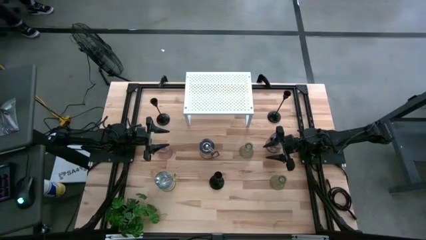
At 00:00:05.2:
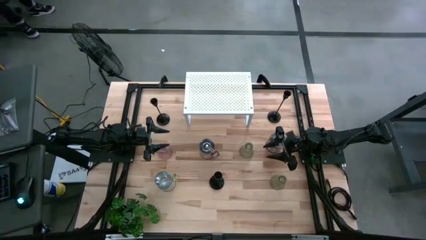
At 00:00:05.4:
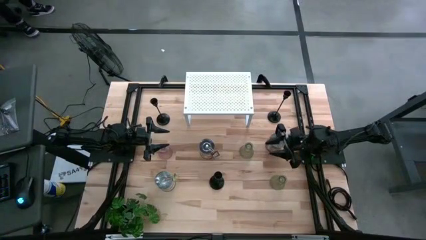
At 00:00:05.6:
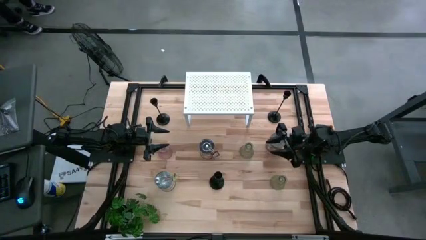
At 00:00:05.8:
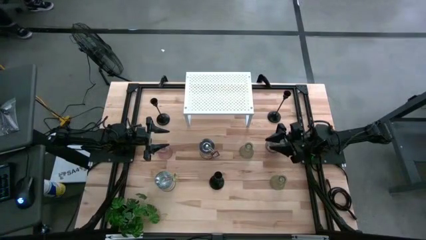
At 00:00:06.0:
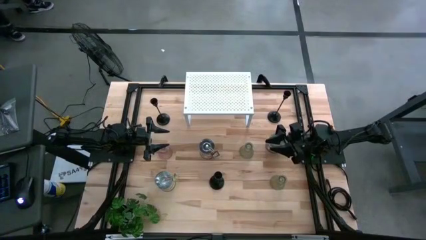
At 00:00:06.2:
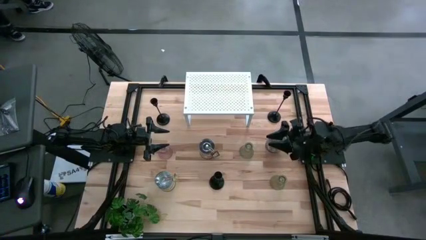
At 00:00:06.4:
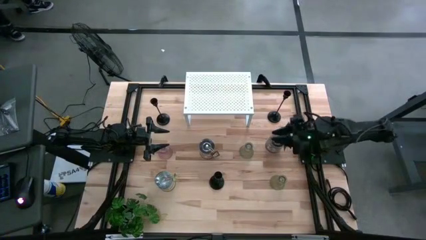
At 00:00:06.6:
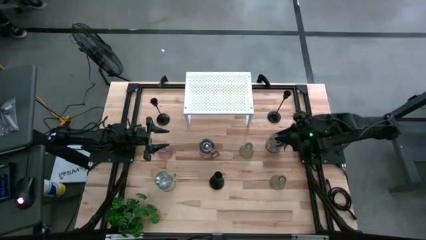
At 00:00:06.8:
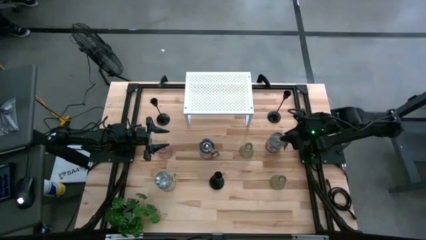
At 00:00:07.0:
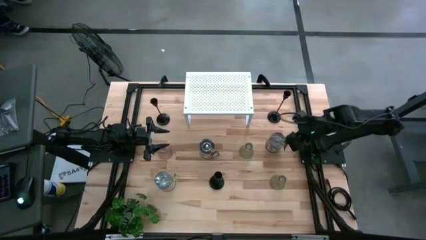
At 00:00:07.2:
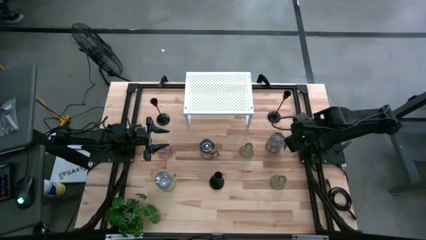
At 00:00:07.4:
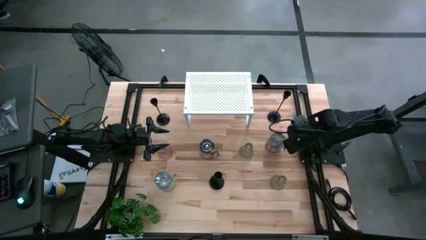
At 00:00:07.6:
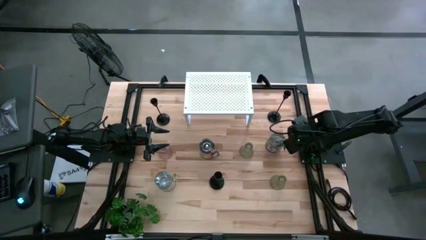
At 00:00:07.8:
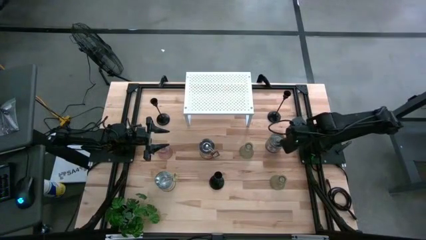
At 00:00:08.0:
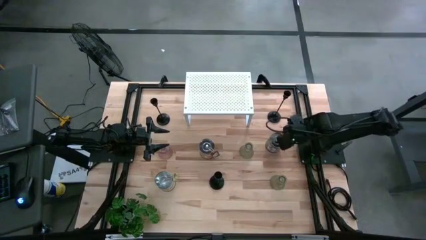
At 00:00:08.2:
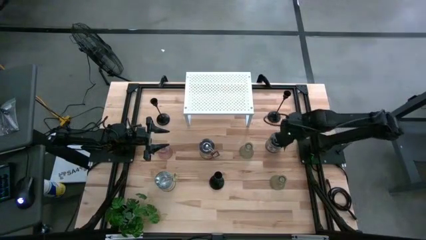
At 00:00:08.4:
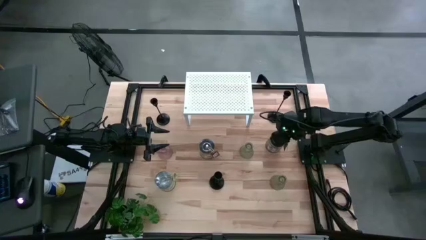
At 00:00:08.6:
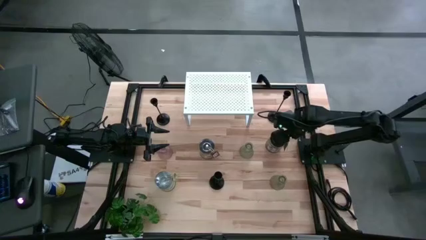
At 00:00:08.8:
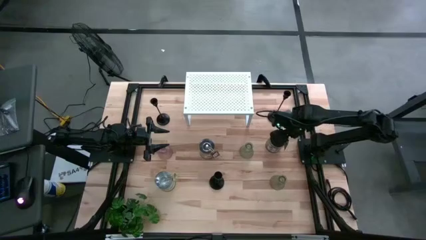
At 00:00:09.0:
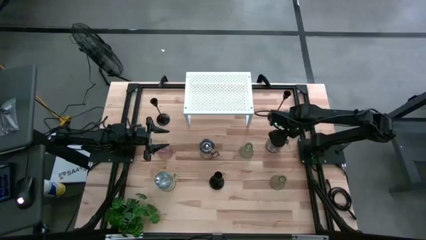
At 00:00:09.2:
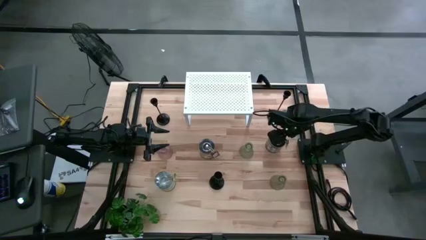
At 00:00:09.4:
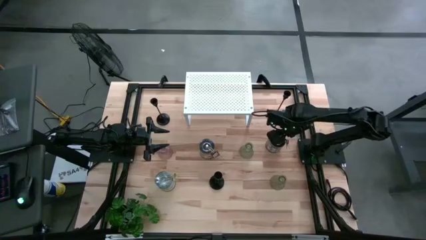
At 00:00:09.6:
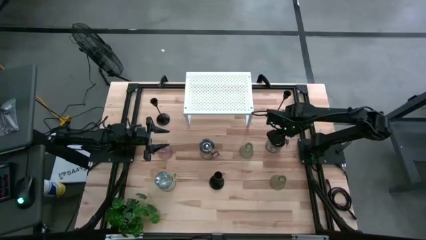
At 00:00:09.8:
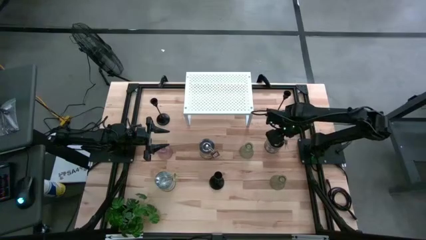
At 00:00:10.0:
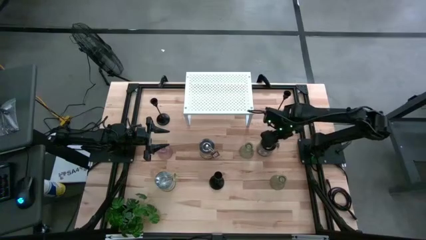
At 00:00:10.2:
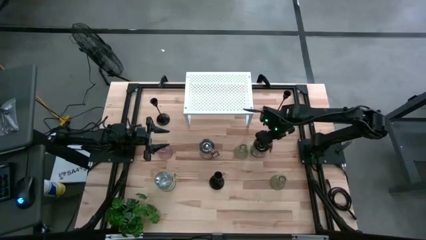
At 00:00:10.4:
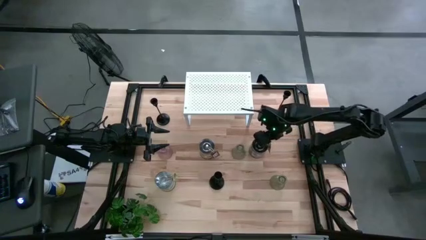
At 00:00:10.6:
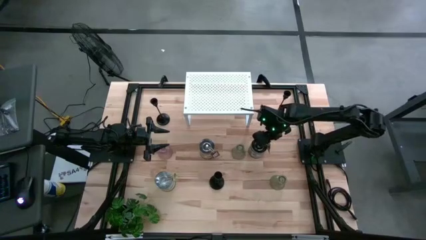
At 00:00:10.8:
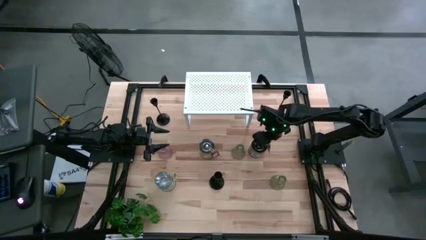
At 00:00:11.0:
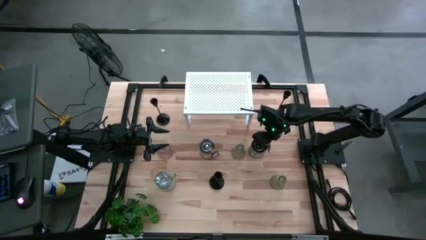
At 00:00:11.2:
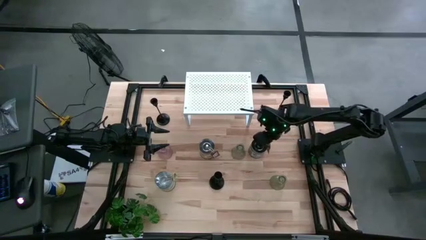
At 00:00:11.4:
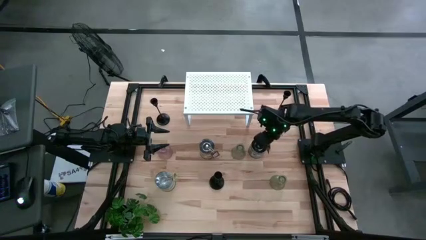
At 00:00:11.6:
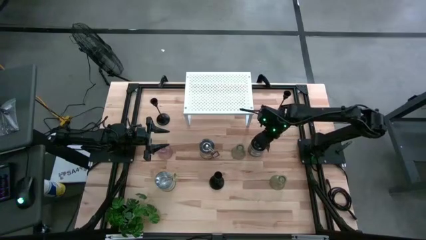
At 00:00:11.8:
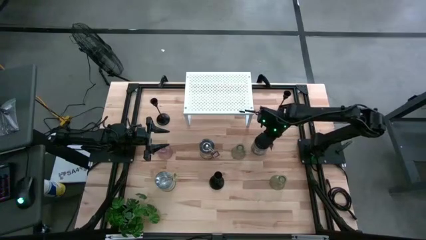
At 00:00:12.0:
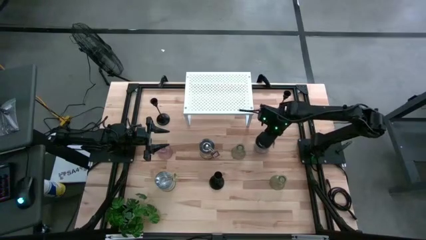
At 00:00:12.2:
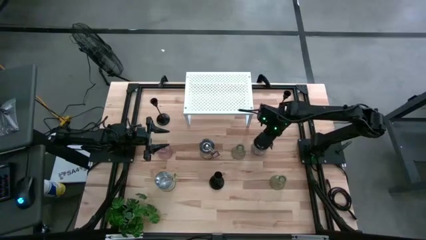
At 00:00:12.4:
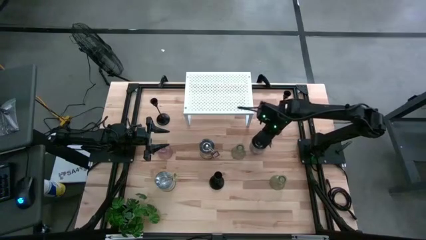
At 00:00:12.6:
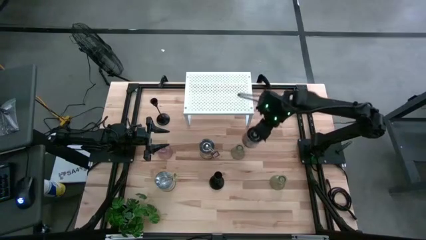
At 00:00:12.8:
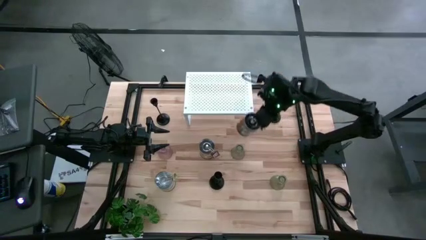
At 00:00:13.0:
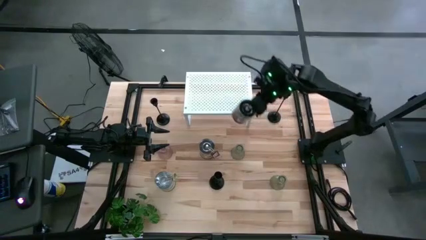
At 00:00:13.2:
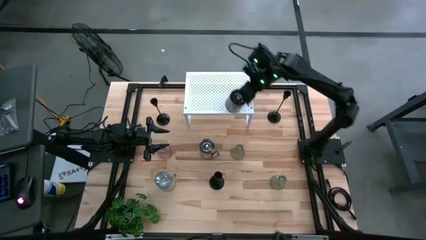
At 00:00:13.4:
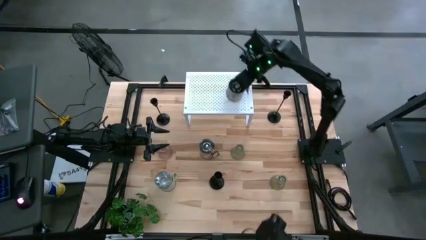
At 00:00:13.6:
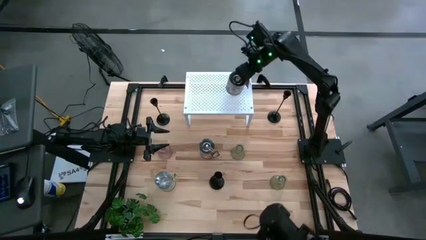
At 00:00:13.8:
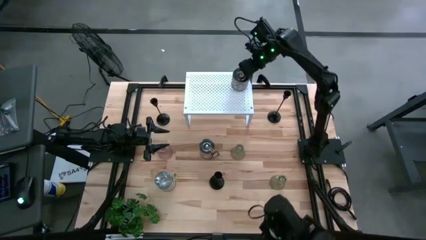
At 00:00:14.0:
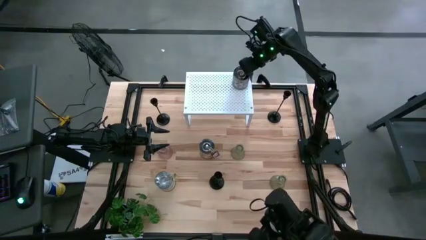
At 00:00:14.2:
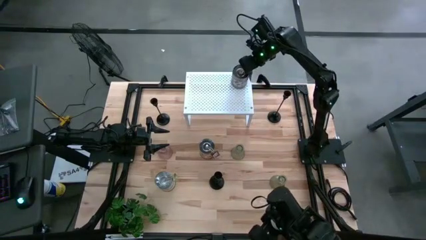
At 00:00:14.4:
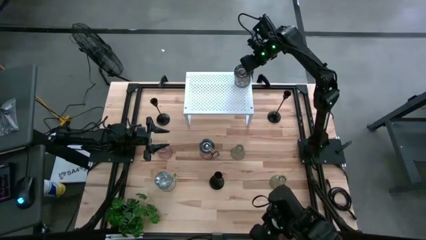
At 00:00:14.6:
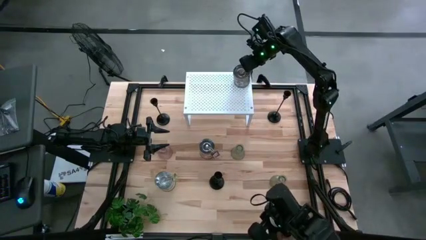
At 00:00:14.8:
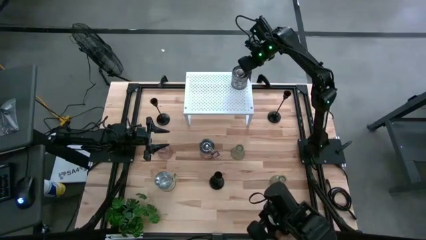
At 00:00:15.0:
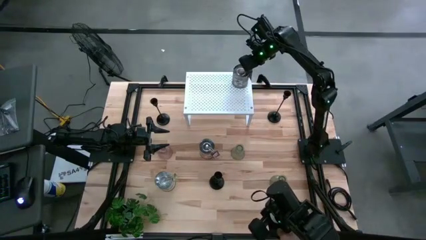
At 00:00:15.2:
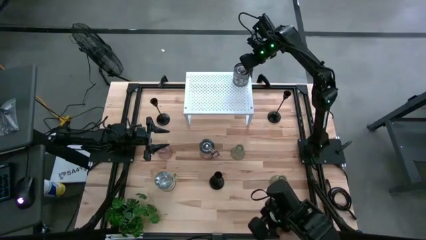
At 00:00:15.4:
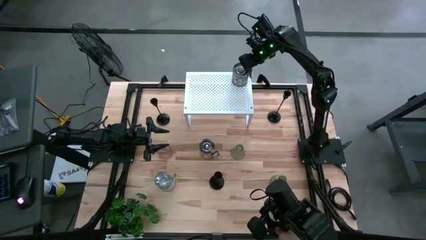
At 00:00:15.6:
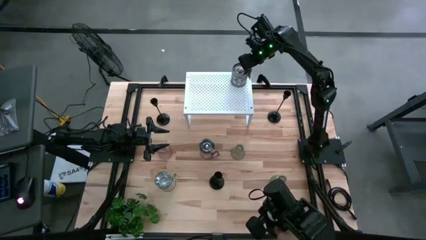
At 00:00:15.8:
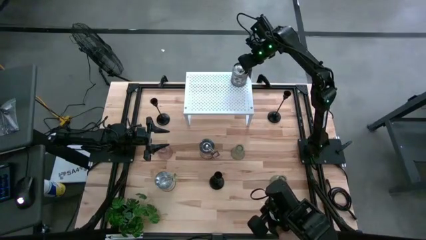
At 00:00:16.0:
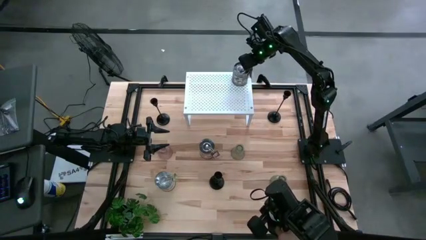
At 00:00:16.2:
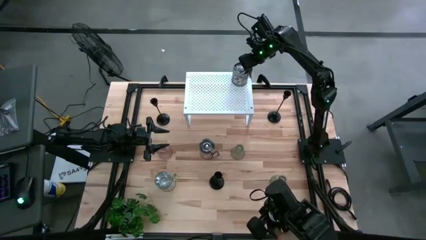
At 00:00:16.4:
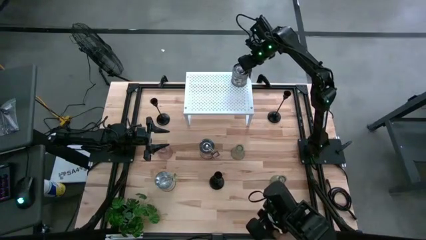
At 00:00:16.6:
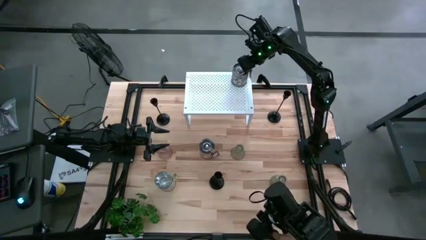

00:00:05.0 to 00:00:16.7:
Task: Pick & Place candle stick holders
Put the right scented candle on the shelf

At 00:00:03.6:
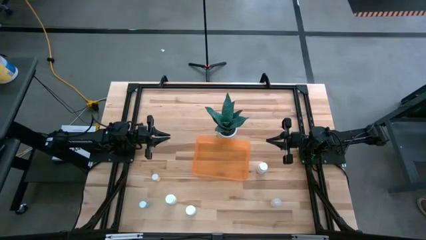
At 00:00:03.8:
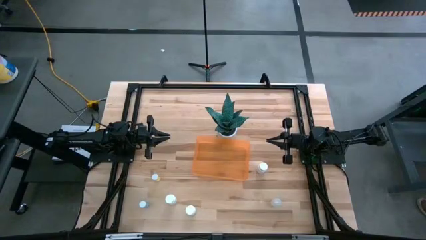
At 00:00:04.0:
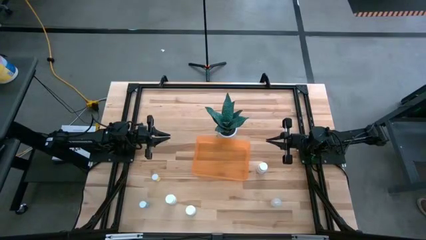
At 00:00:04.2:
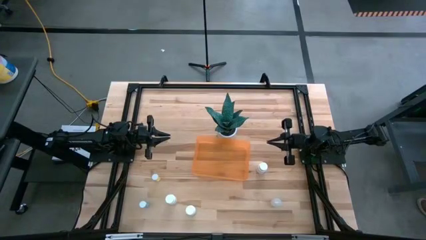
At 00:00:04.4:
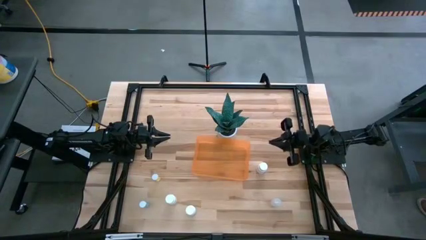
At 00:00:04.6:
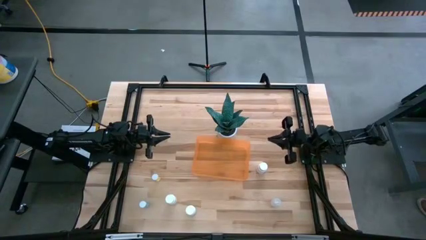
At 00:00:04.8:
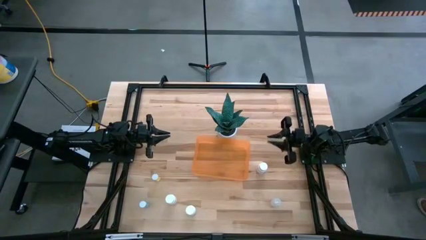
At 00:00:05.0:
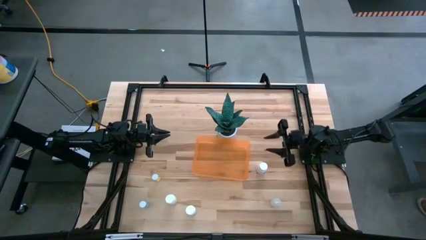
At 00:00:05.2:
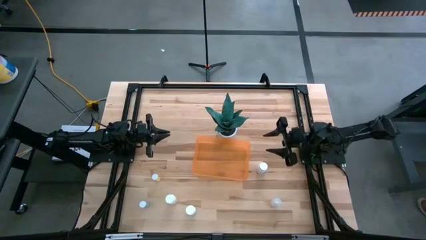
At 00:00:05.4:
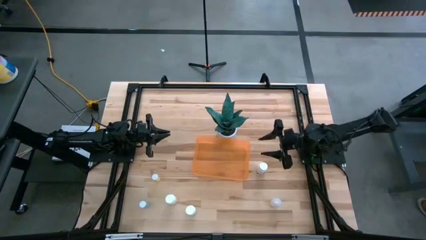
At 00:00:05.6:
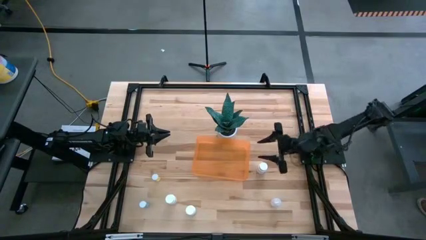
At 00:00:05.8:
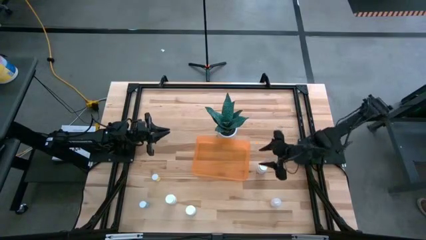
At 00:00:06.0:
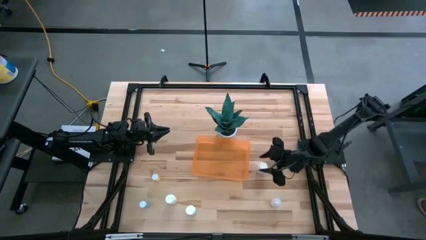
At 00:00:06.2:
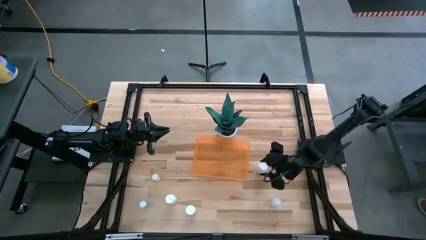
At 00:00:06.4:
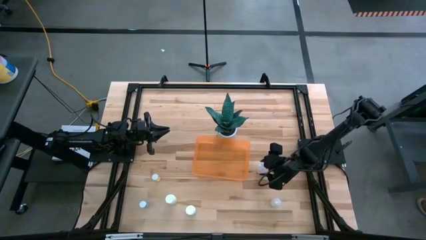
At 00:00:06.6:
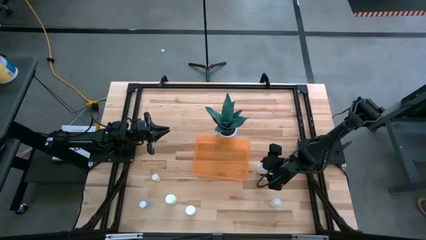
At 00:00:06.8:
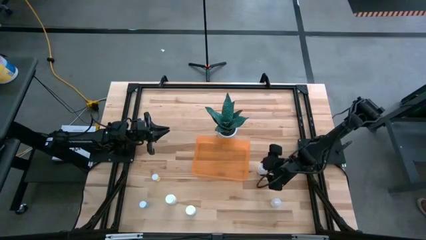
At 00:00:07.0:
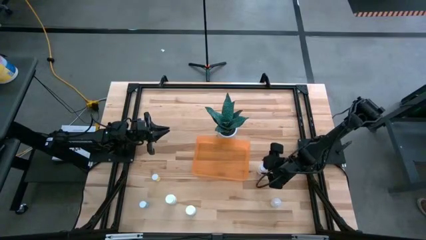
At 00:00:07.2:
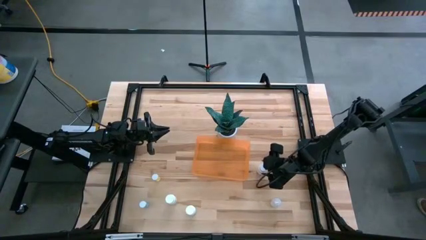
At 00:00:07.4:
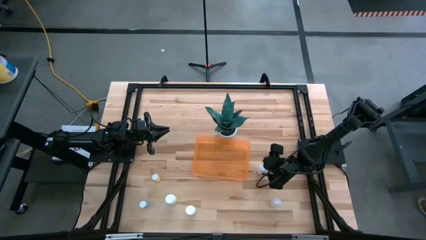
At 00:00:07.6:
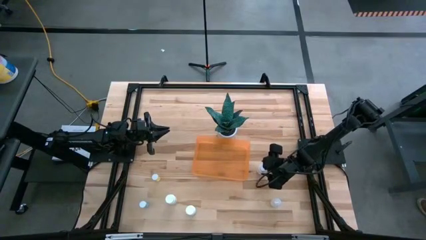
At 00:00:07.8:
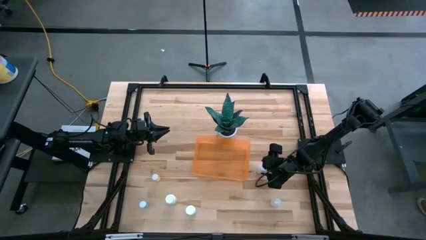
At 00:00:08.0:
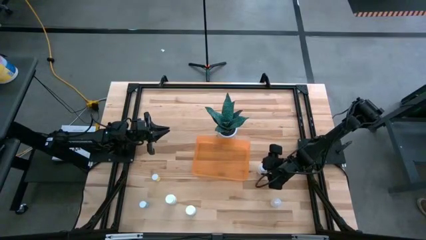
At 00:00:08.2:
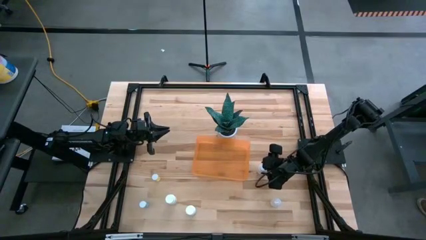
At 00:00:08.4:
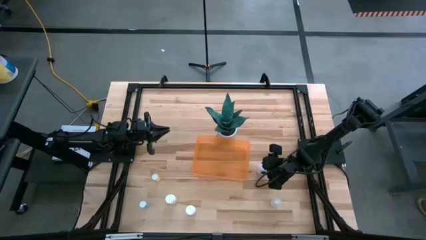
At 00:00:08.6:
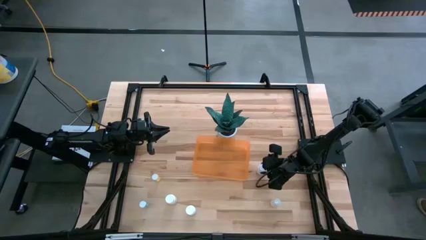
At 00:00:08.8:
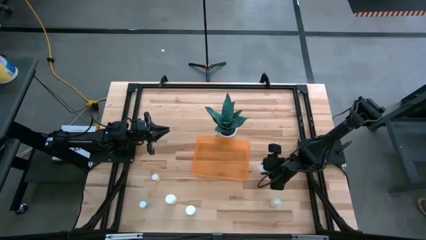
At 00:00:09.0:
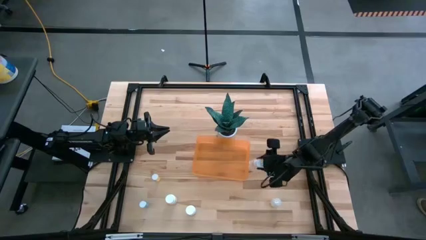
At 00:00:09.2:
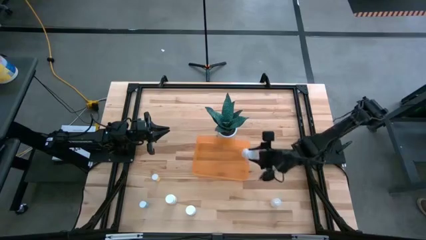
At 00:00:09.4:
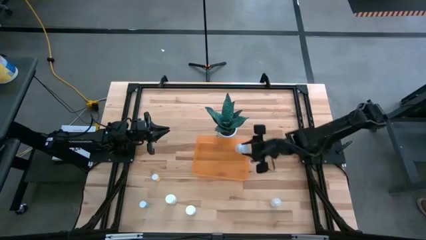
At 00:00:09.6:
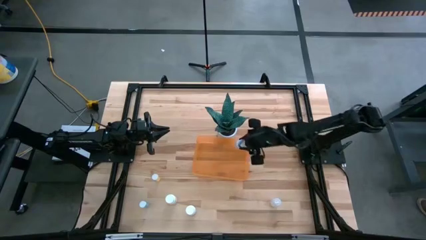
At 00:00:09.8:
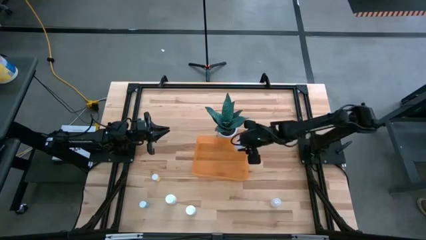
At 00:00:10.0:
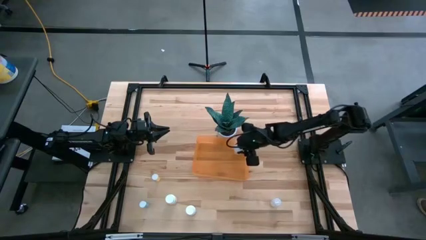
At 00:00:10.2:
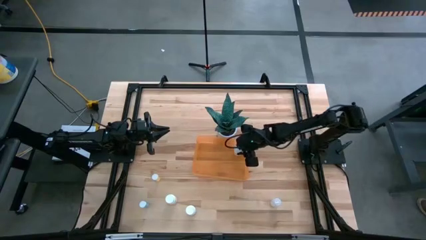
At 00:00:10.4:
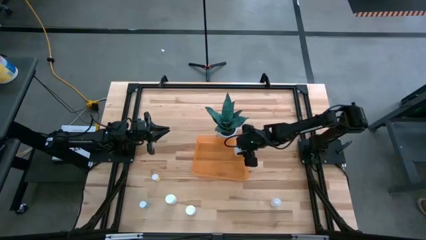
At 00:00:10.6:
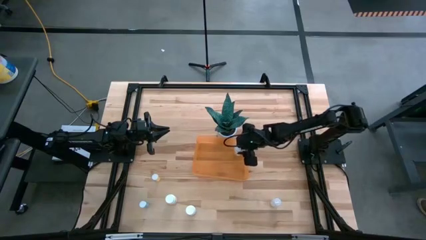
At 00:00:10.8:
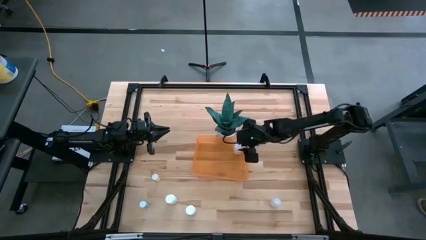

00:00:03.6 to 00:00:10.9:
Task: Pick and place pill bottles into a basket
Put the top right white pill bottle into the orange bin
